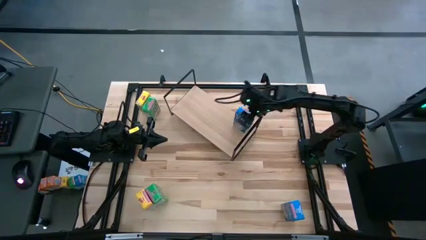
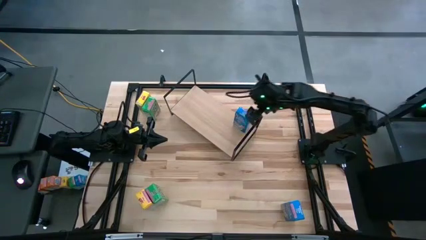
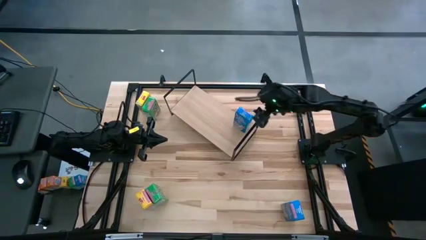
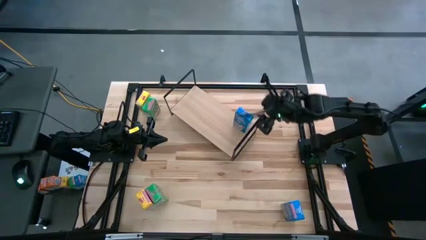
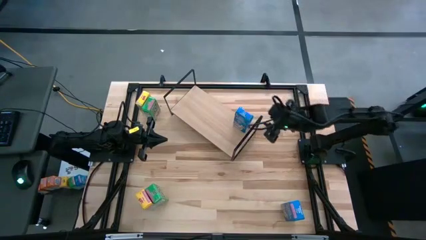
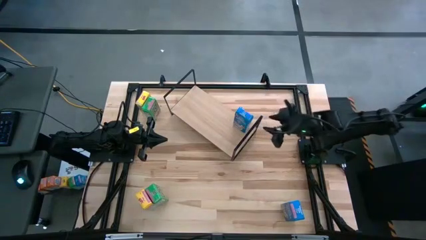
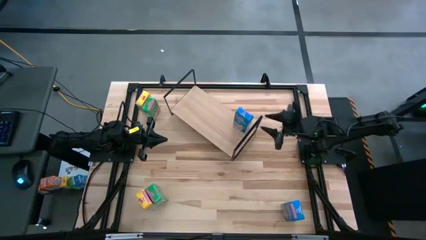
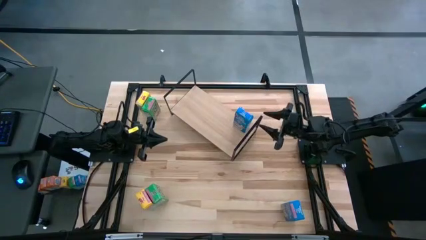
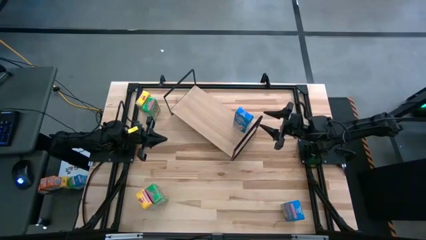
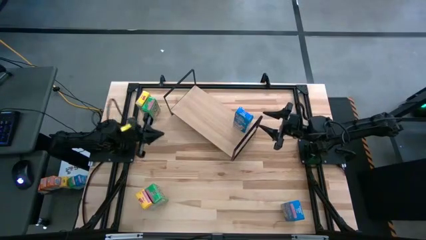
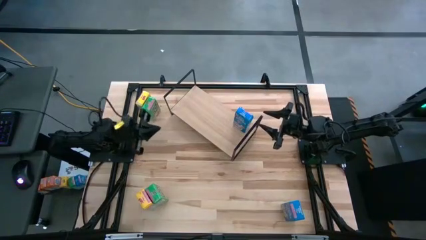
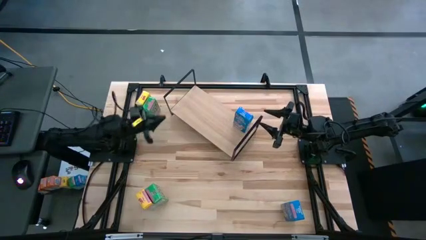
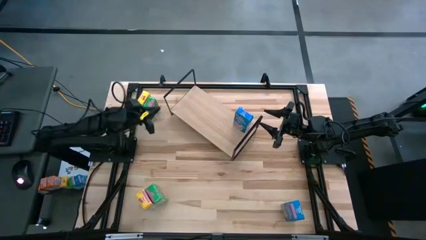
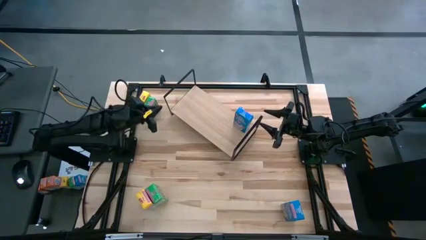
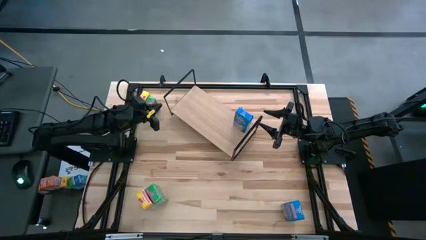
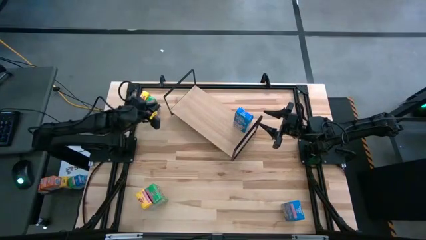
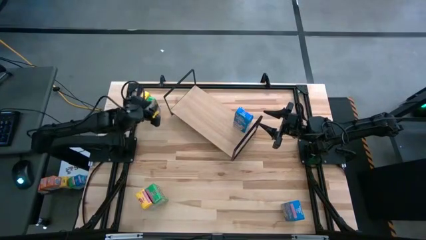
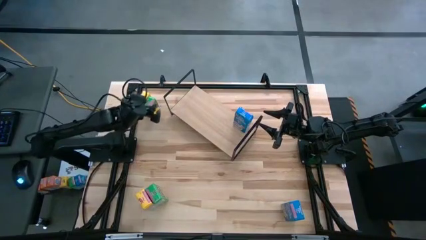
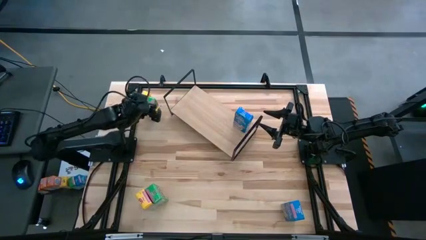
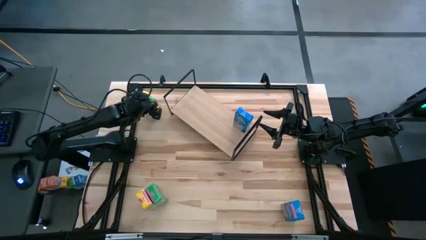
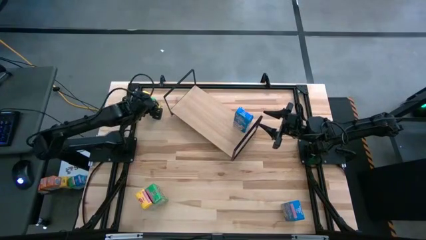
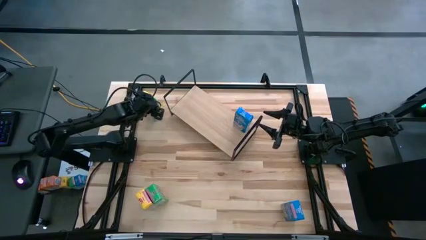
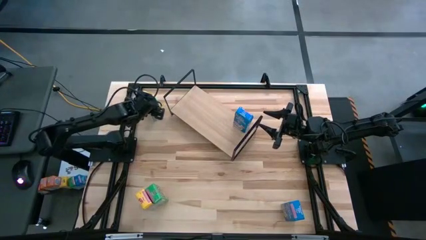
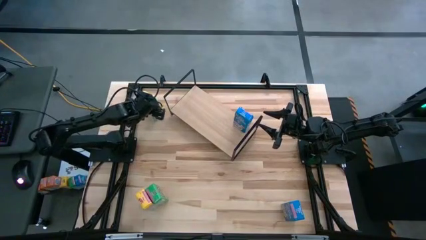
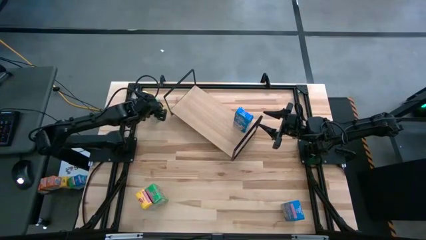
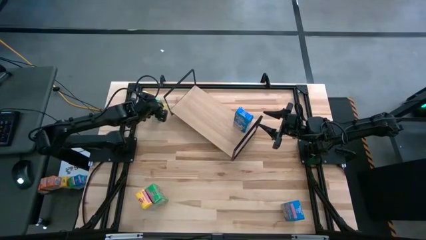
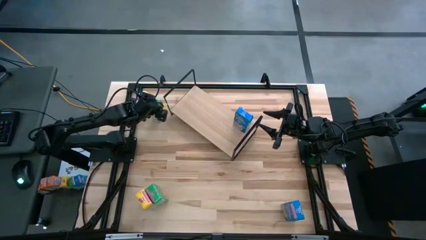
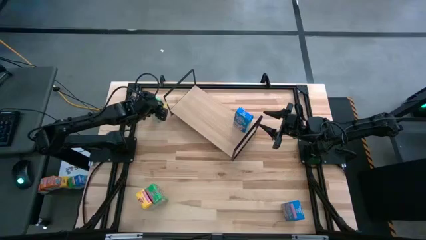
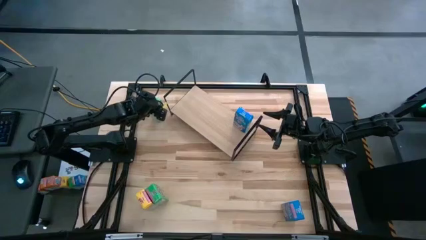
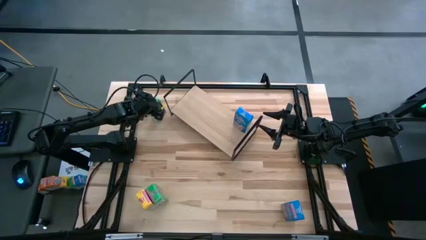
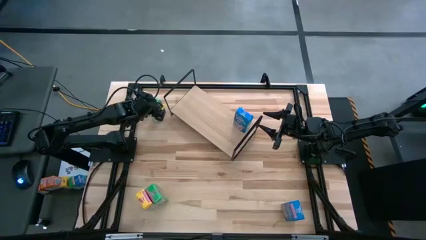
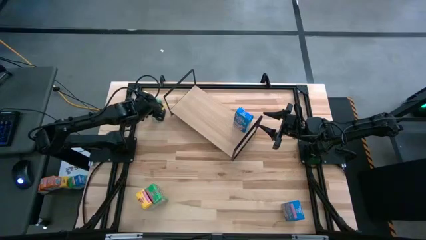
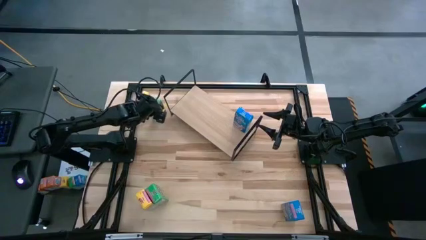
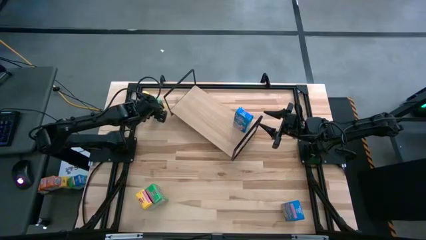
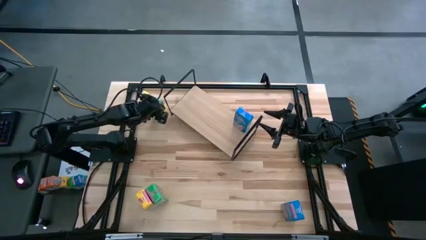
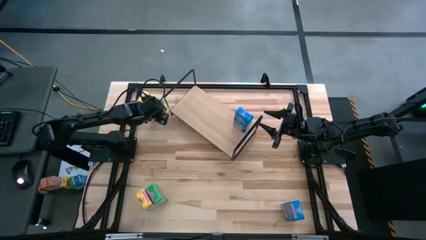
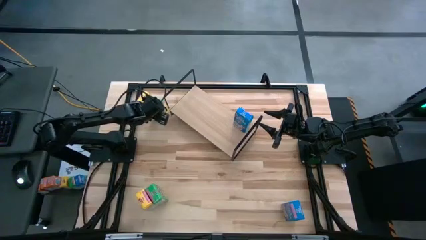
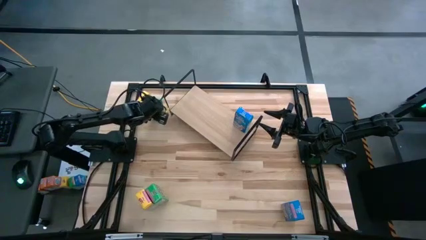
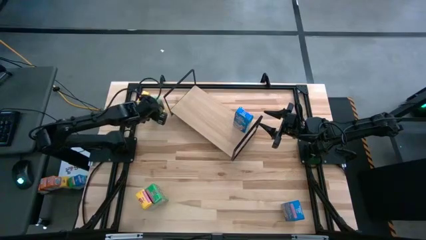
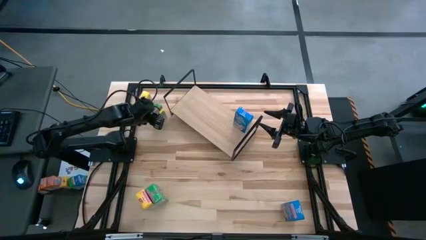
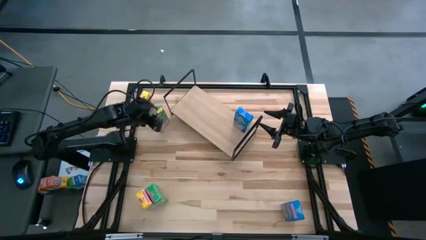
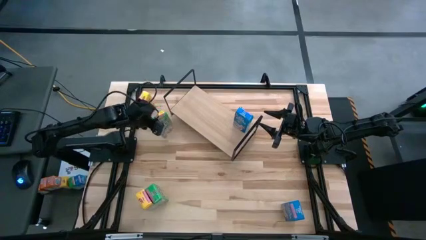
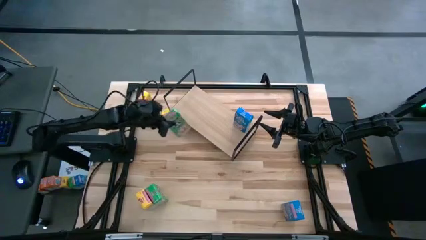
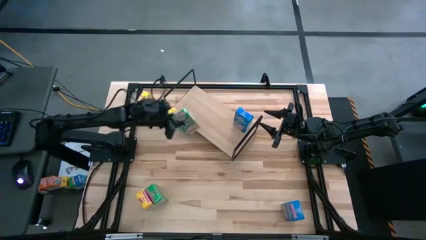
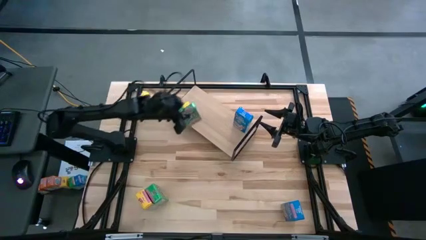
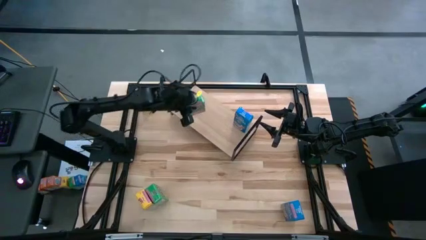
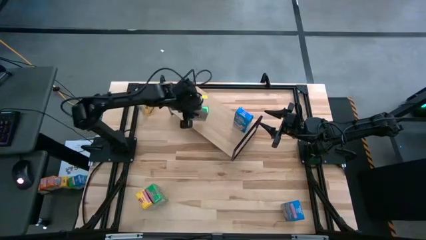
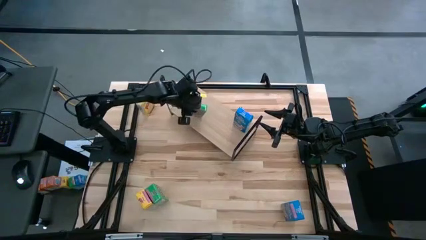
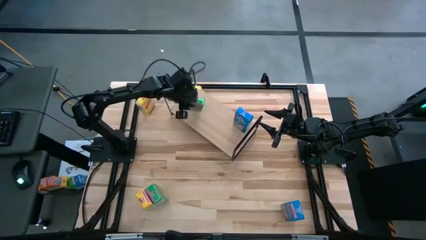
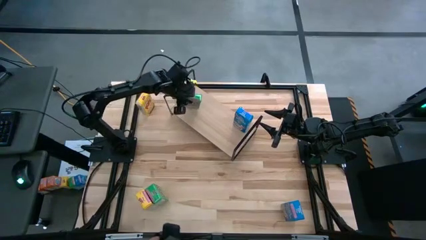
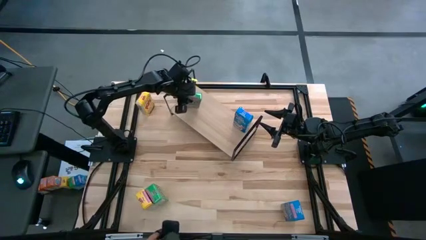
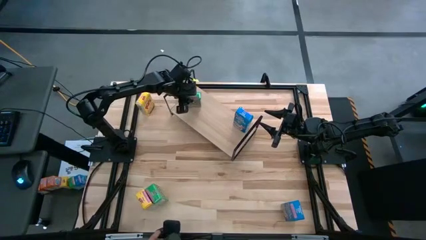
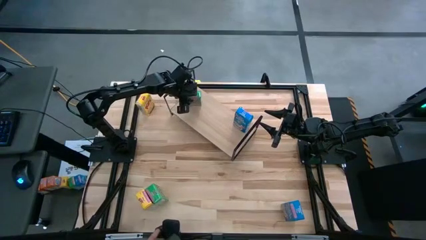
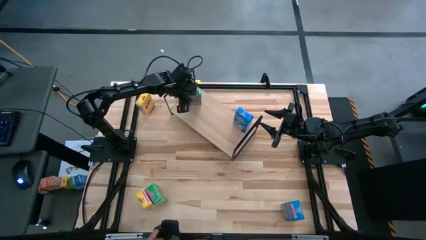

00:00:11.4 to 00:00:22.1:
Task: Stack cereal on shelf
Put the top green cereal box on the shelf

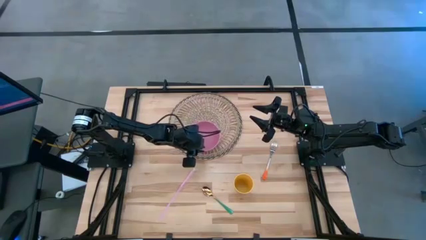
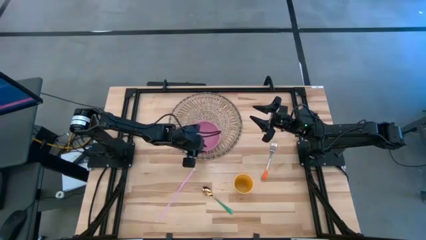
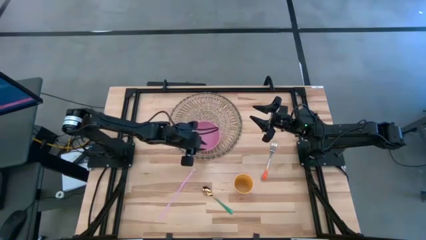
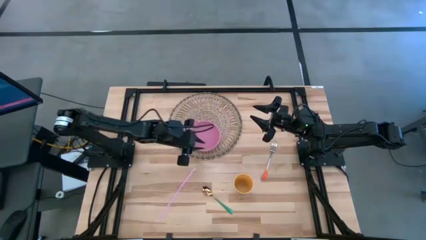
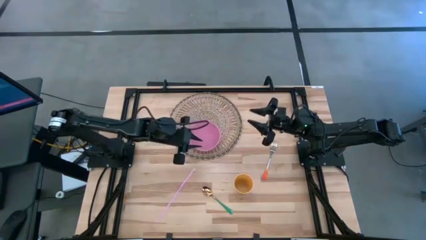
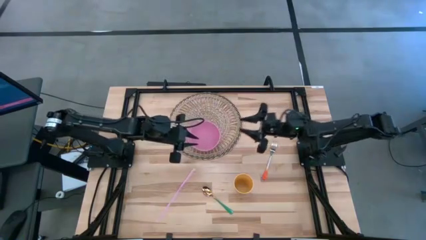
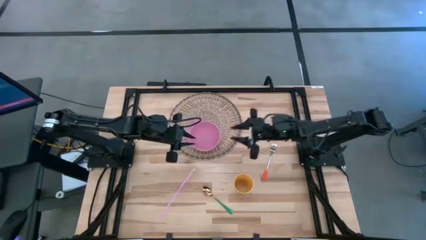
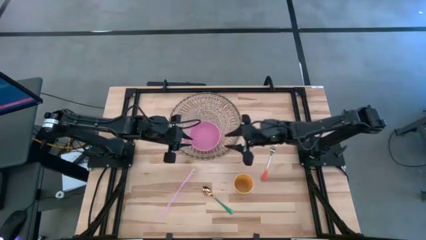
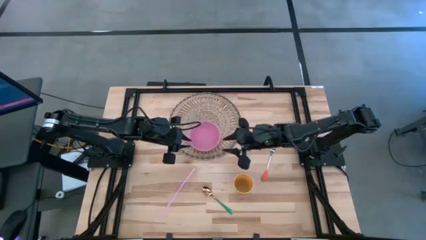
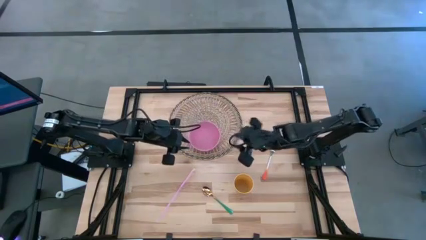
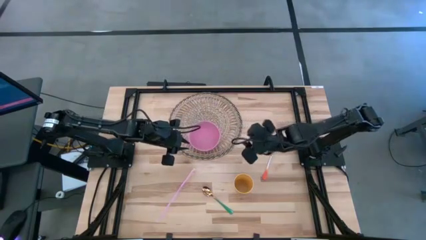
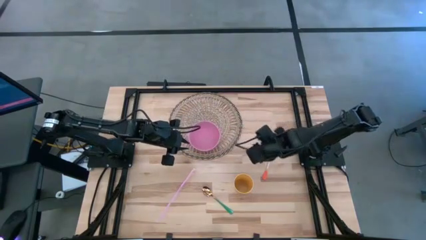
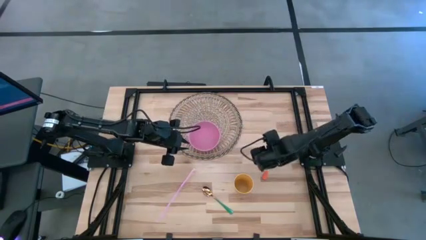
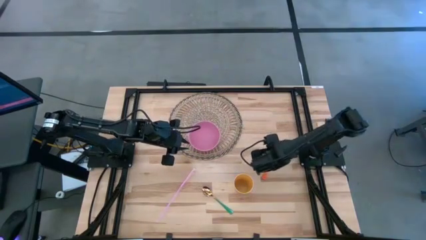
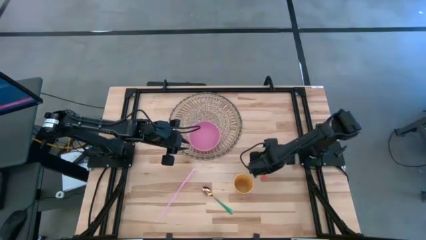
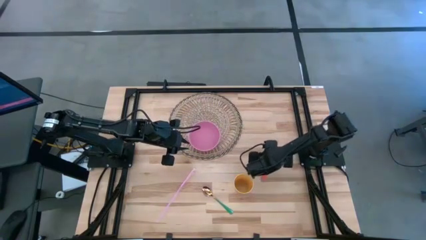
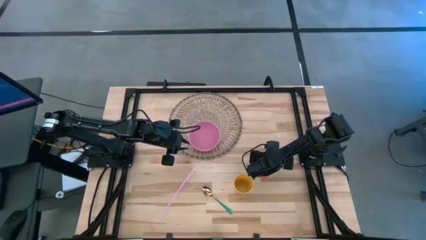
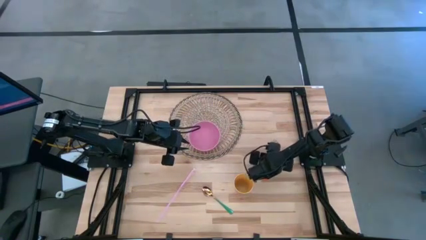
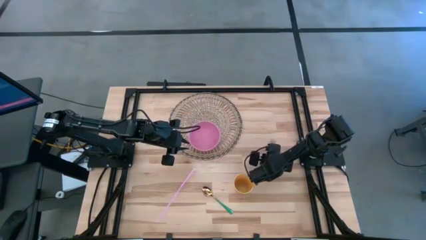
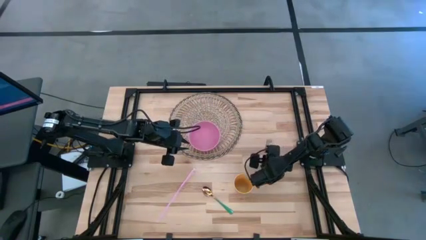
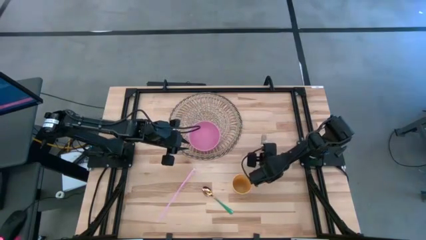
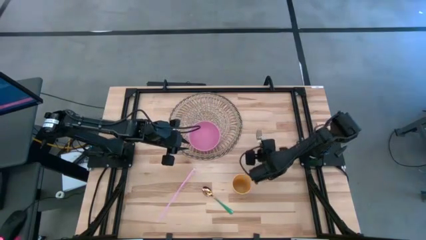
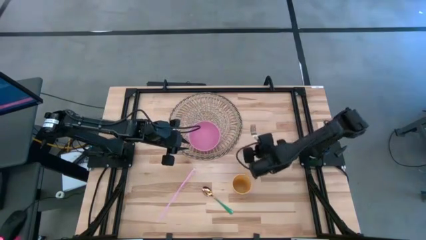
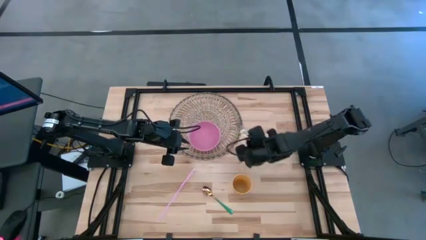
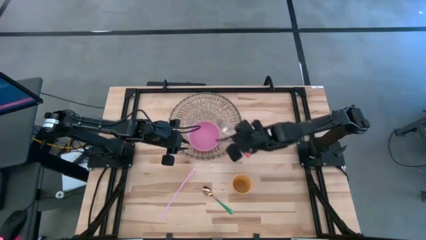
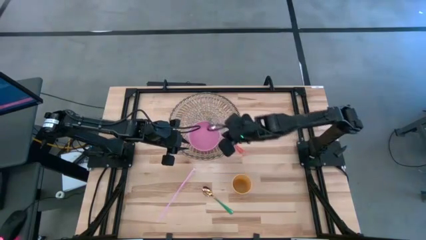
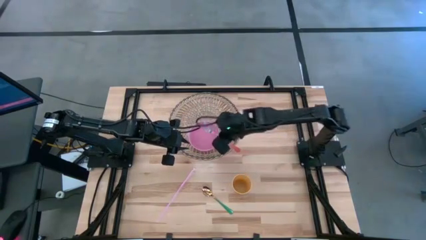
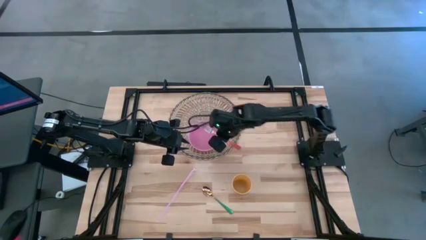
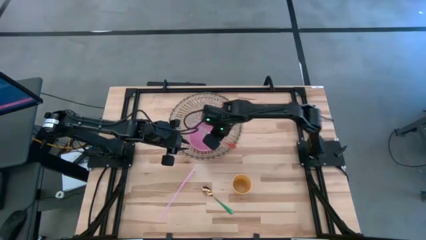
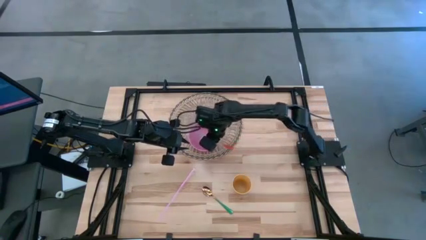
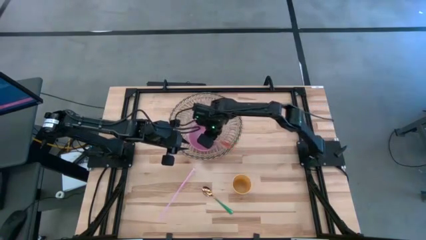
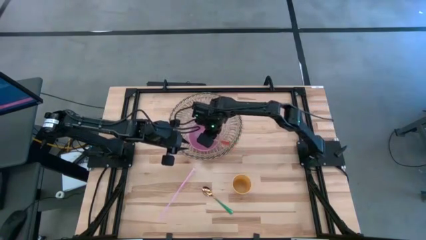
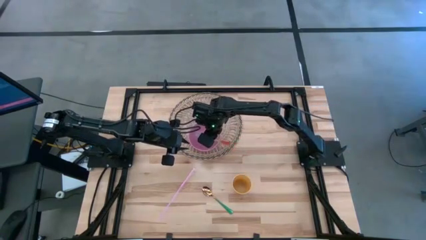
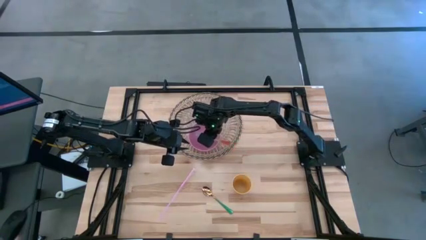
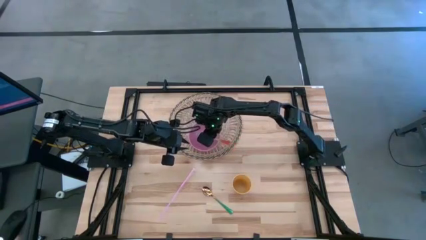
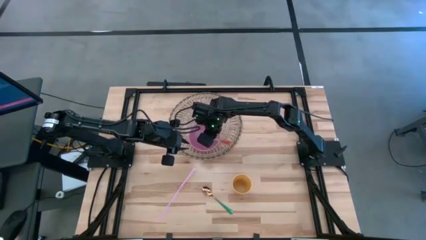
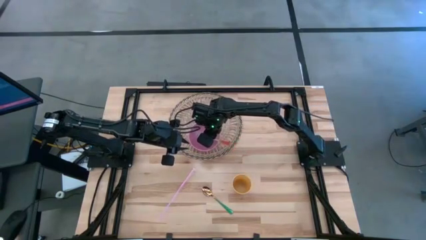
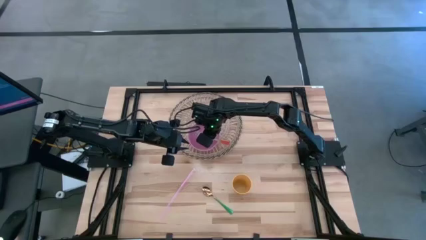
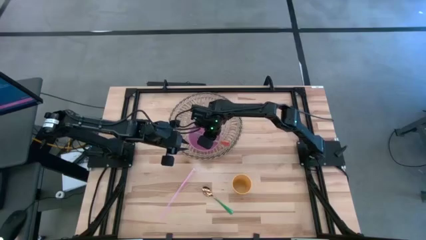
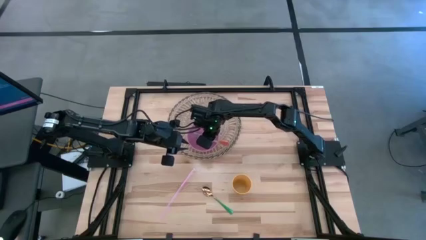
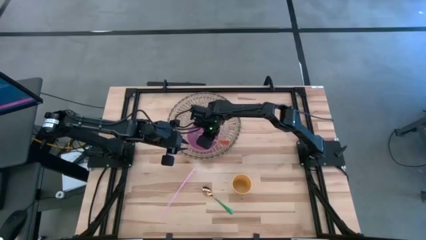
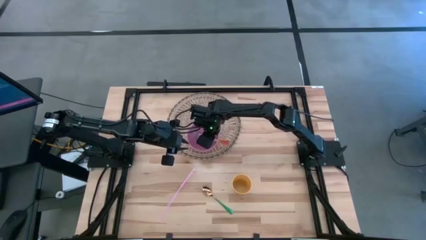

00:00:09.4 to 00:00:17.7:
Task: Pick & Place Utensil
Put the orange fork into the pink bowl
